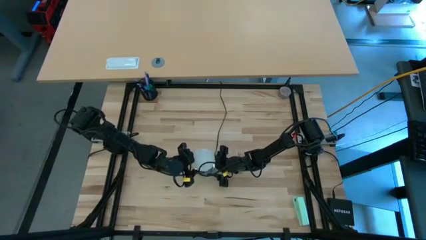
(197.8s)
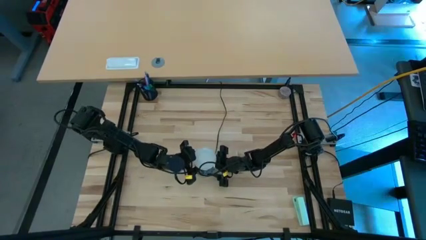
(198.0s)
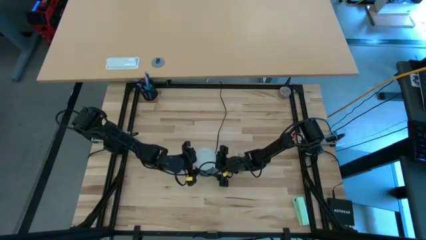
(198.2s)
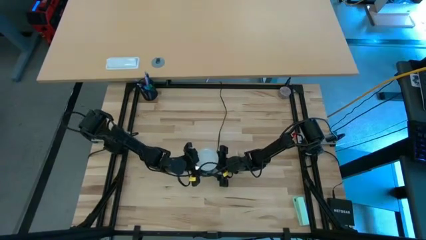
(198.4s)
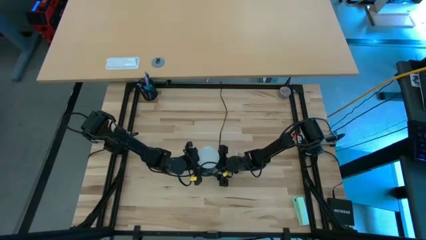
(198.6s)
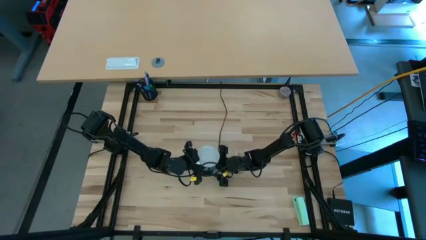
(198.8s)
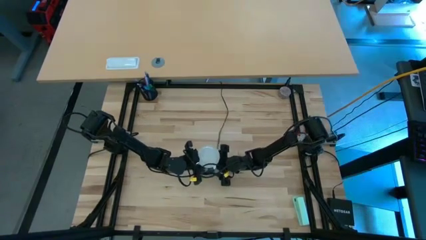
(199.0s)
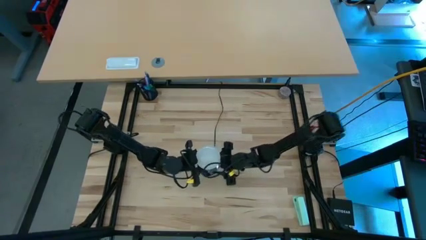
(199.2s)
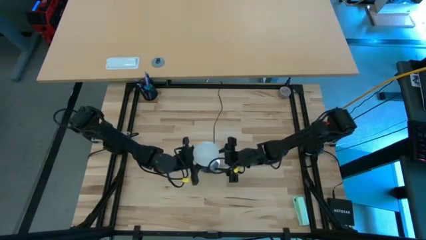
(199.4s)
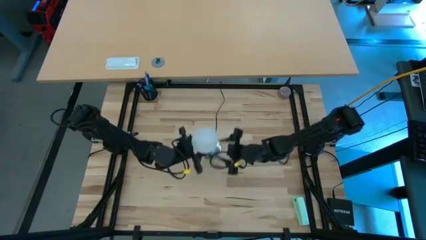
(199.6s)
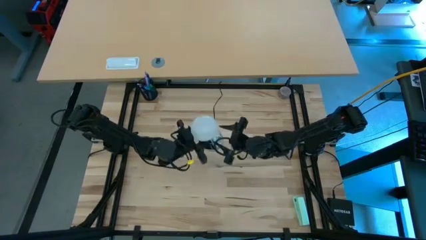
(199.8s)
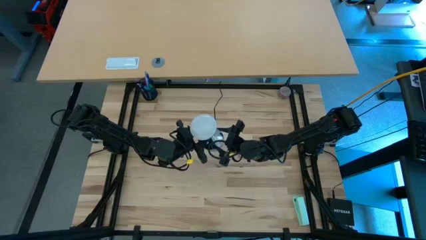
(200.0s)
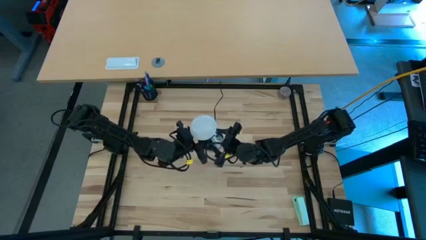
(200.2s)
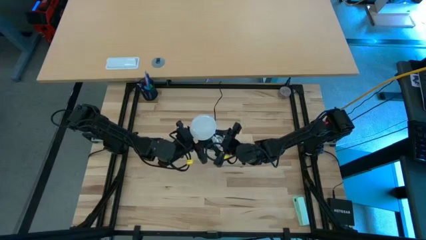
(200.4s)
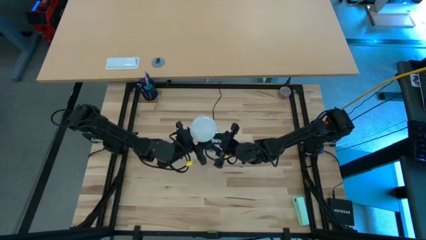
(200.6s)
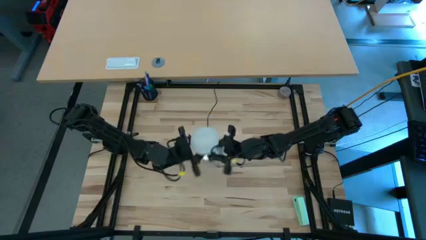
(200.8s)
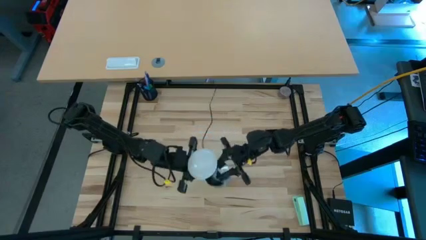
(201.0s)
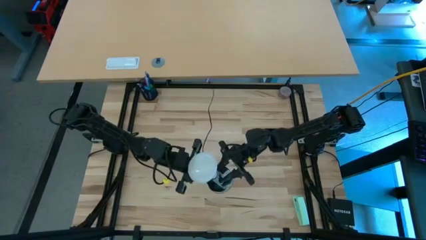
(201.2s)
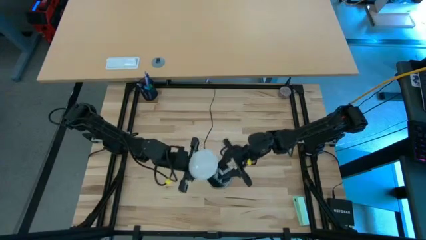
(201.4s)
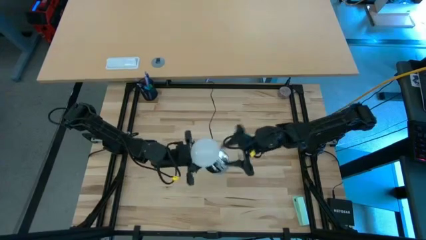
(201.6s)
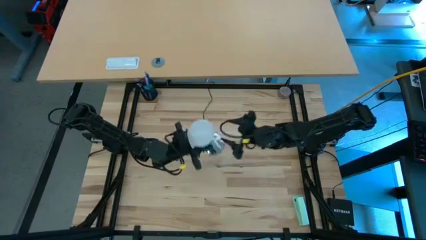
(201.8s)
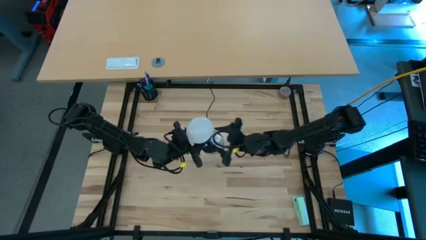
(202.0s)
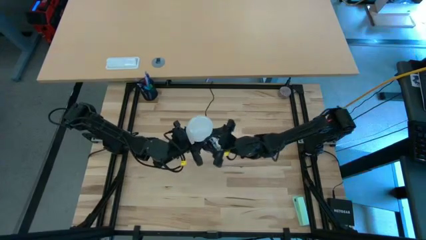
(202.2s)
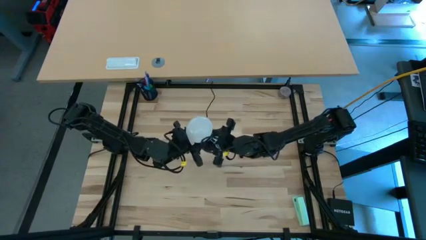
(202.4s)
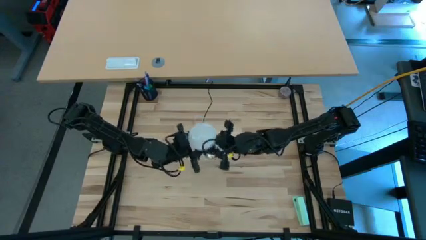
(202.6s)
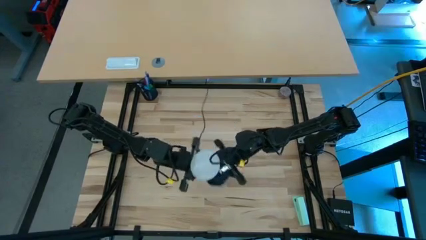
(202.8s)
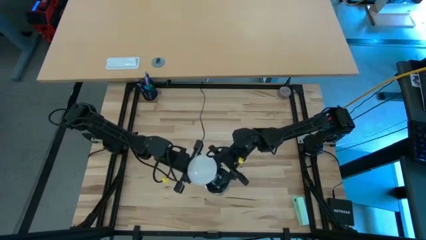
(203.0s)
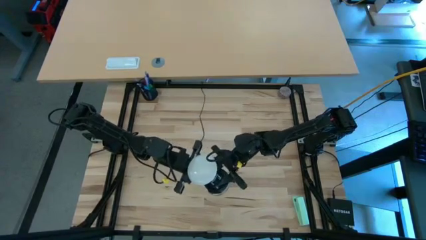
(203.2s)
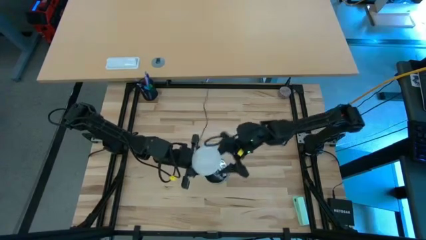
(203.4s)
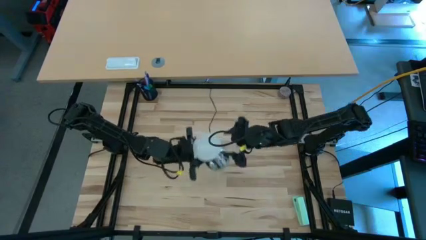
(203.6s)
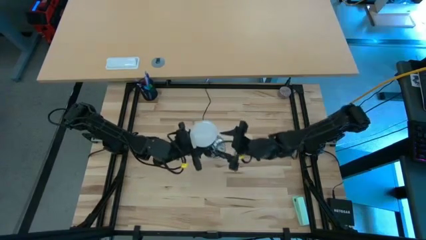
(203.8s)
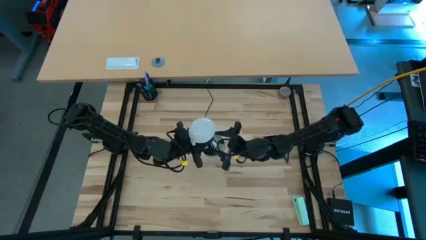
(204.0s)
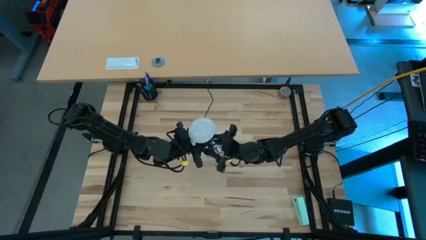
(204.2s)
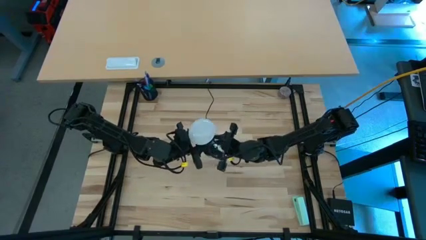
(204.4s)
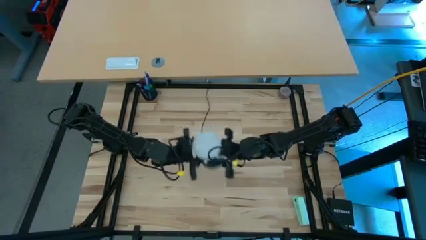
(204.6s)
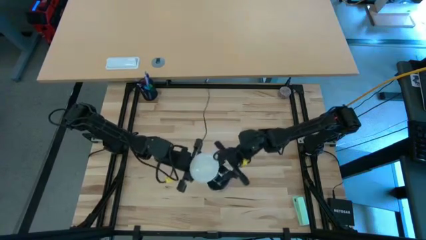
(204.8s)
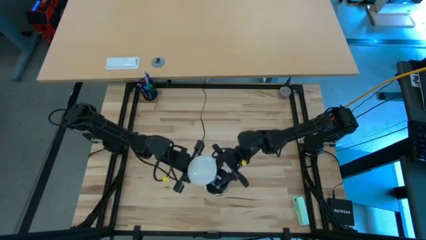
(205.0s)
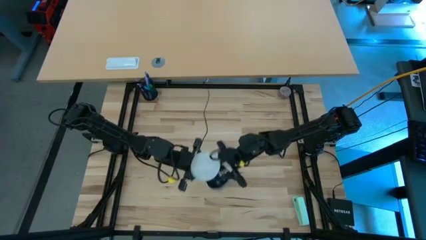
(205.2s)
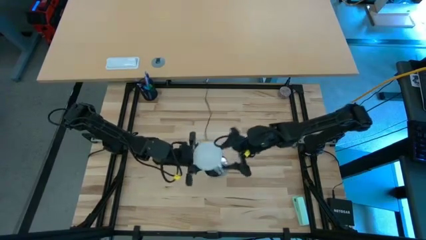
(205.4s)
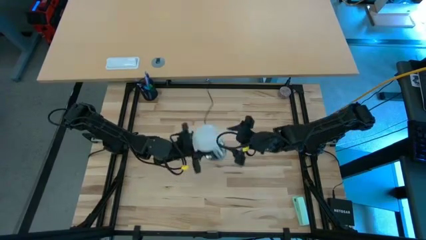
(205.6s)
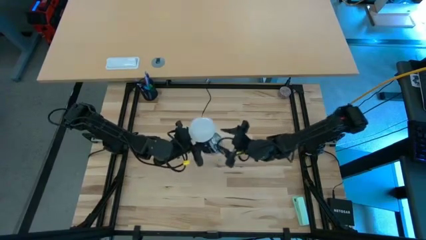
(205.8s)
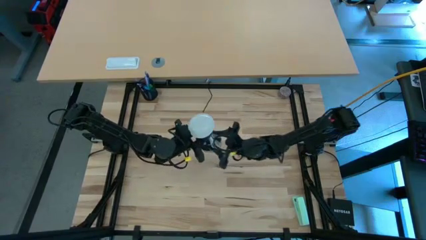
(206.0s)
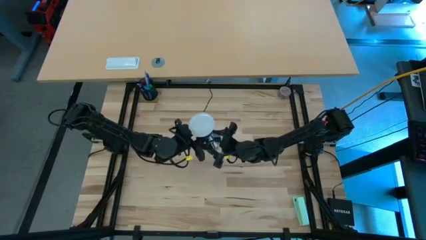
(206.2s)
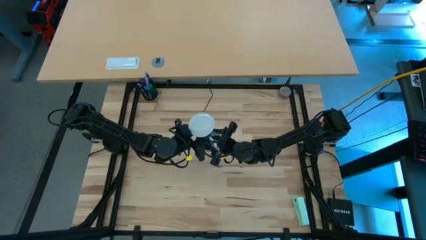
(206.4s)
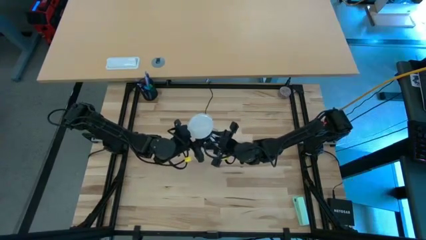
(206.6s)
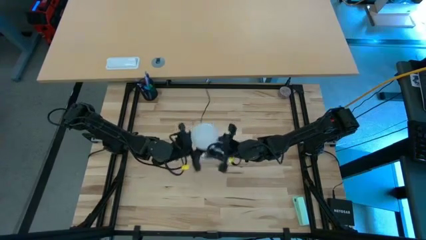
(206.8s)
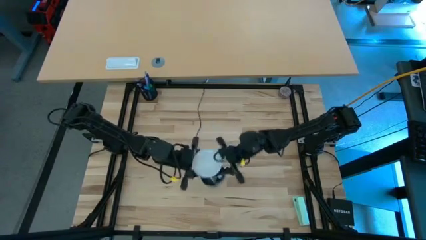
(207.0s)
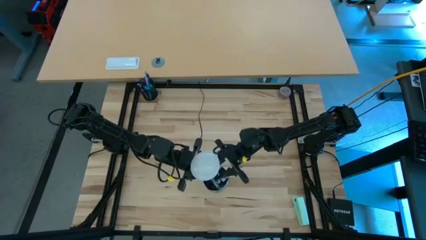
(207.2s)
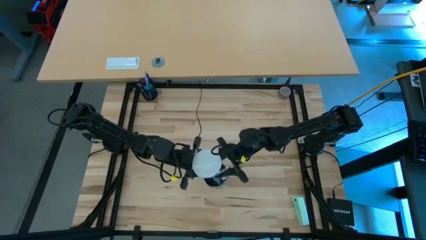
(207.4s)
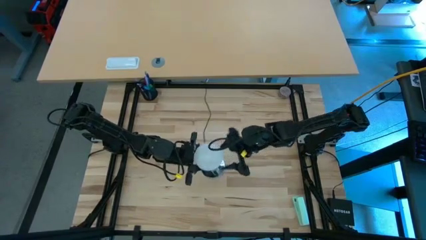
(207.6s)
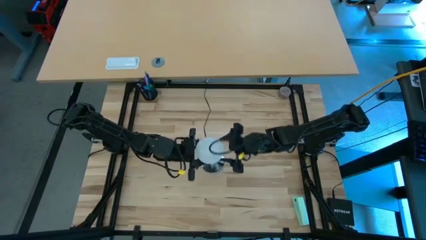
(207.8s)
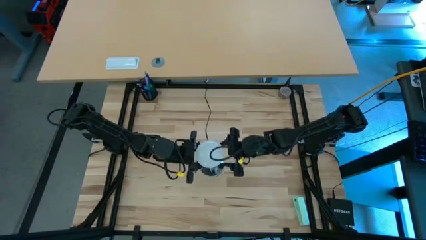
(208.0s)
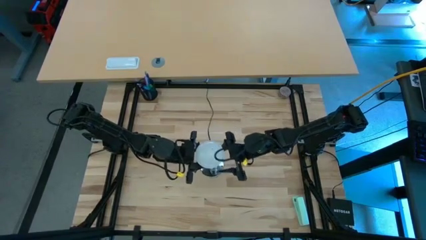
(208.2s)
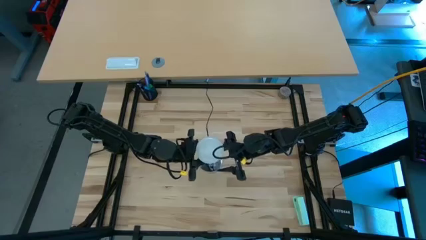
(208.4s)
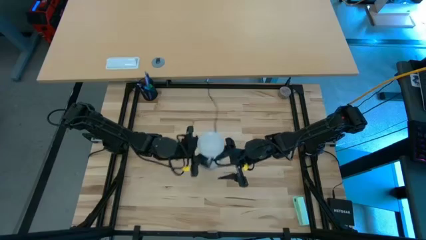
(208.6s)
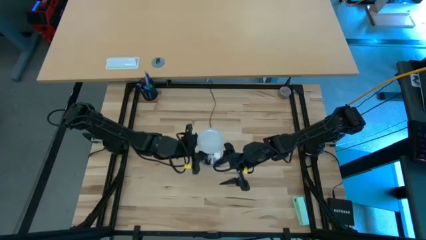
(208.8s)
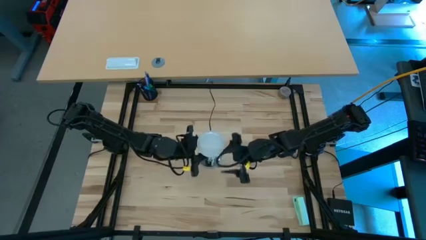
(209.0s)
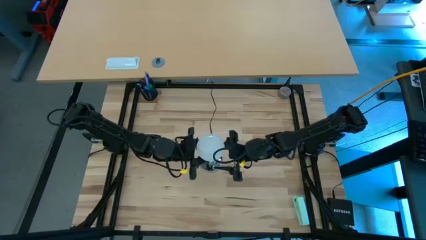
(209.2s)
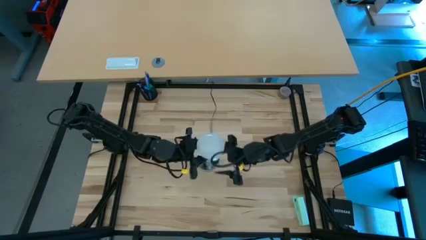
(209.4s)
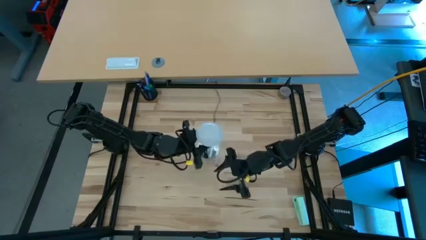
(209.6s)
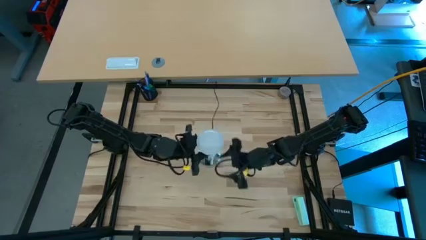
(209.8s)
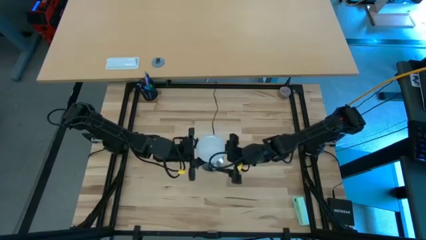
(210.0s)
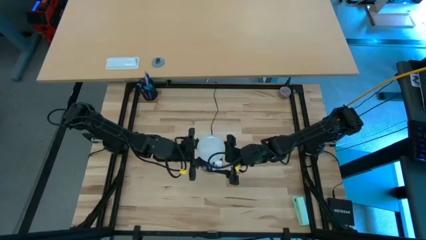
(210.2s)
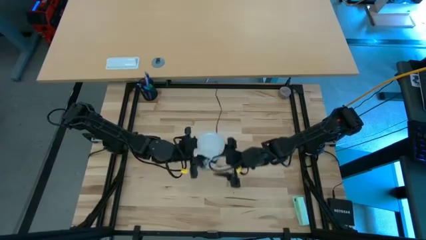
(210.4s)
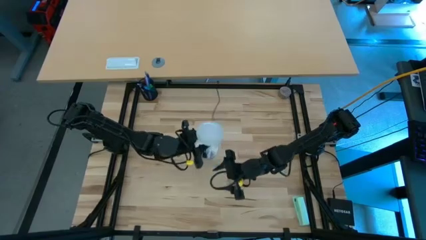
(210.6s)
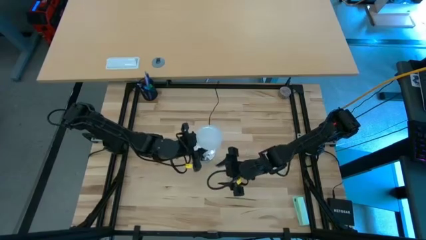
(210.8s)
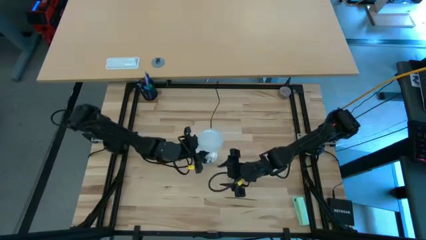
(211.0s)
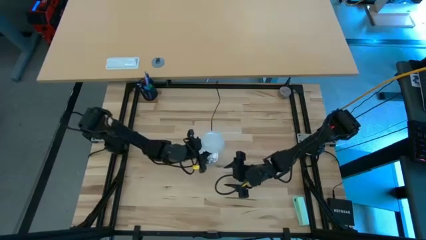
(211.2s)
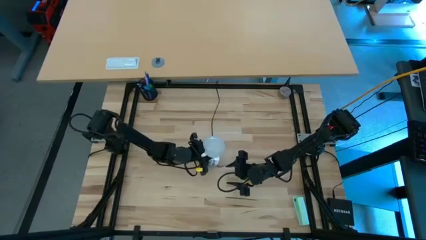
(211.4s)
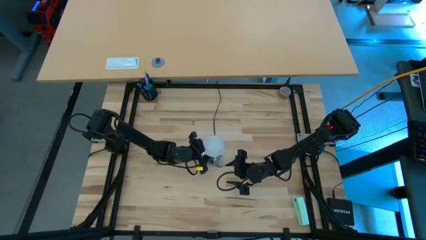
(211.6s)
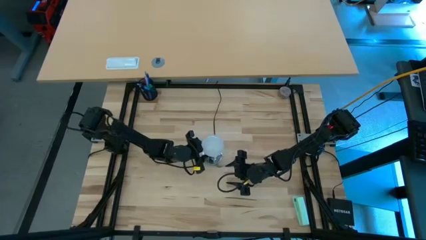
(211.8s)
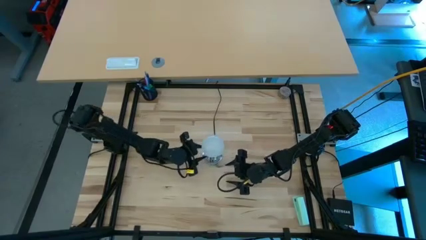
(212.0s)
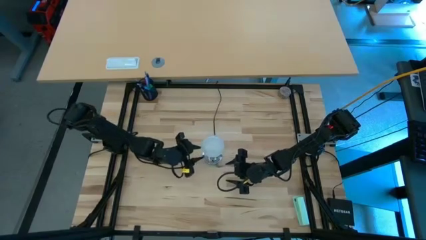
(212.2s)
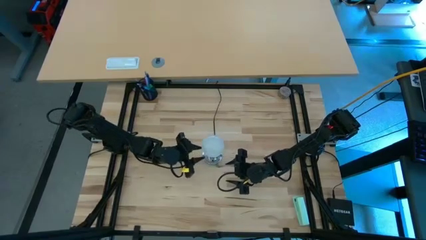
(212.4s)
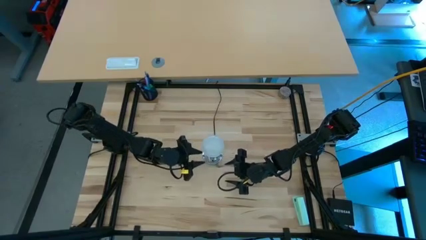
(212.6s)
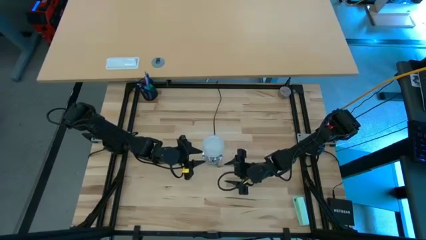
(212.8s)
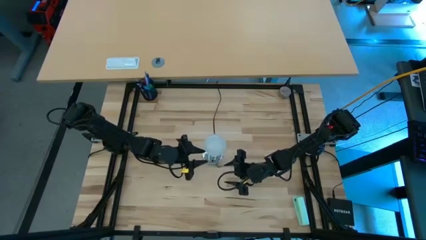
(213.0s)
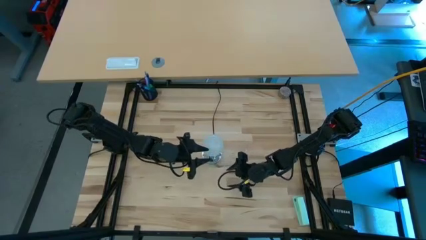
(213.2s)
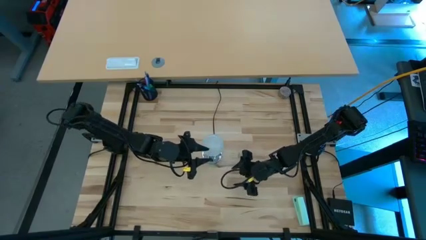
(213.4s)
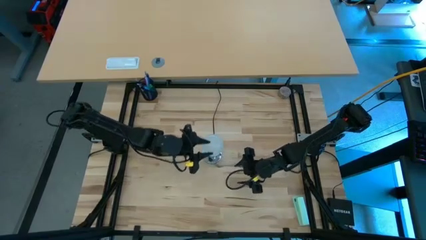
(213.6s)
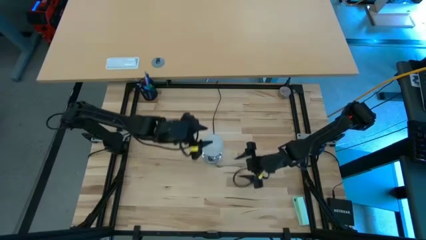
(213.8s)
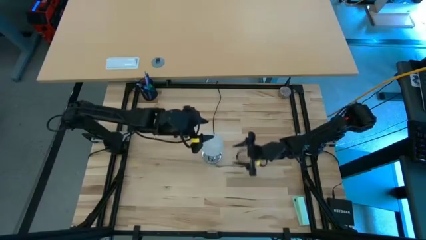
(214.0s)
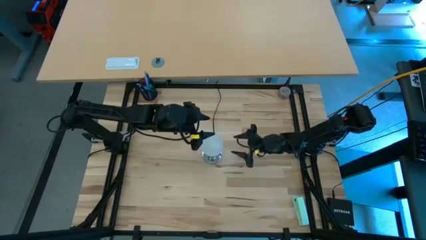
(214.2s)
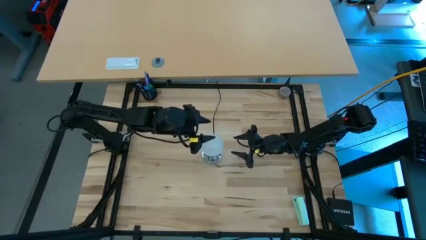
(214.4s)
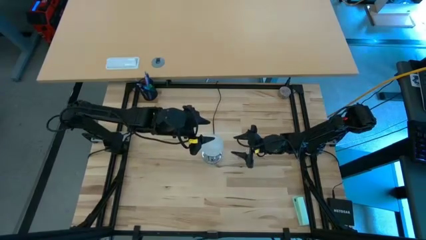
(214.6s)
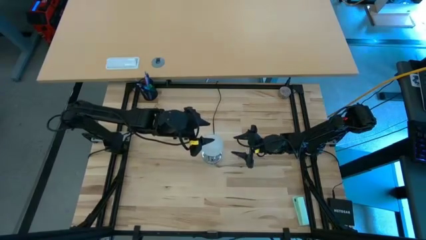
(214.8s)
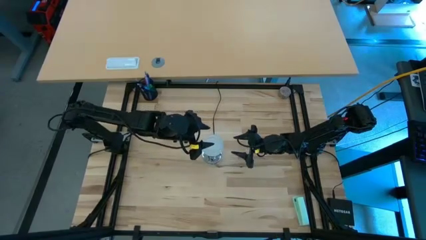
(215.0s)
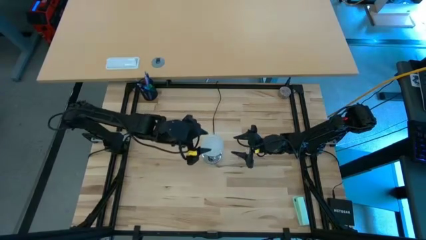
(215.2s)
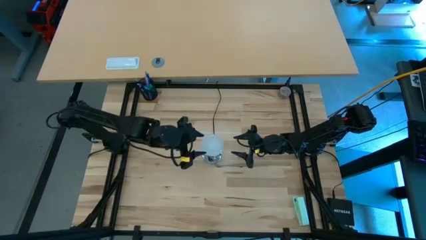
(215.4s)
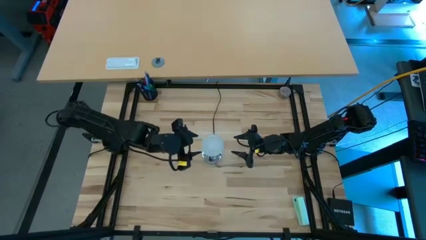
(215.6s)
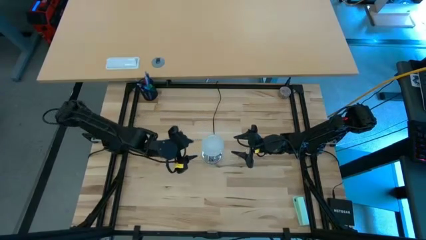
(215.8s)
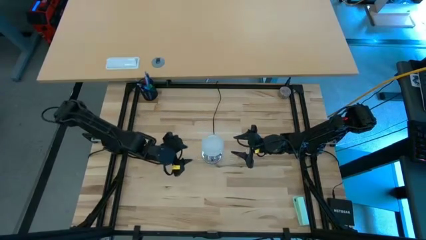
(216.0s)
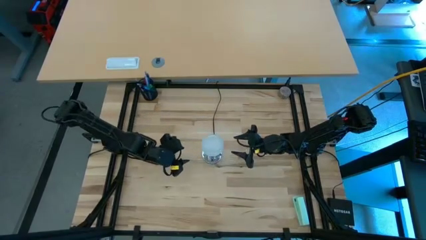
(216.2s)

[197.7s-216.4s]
Task: Screw lightbulb
Remove the lightbulb from the lamp
